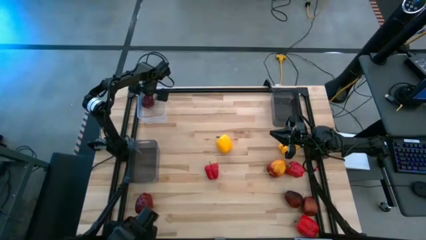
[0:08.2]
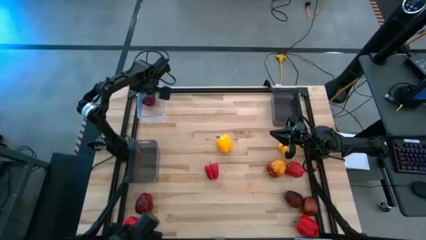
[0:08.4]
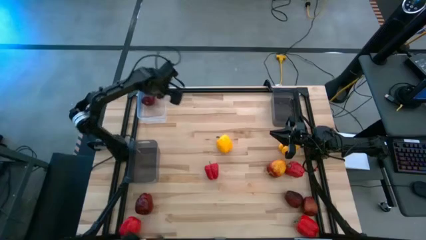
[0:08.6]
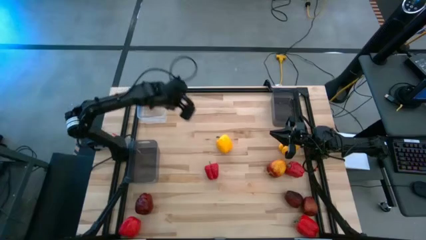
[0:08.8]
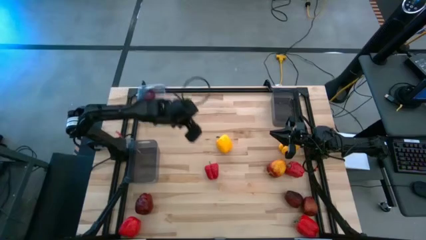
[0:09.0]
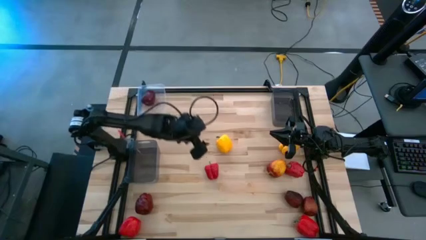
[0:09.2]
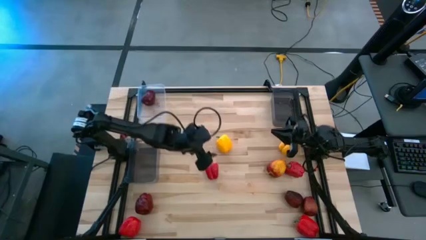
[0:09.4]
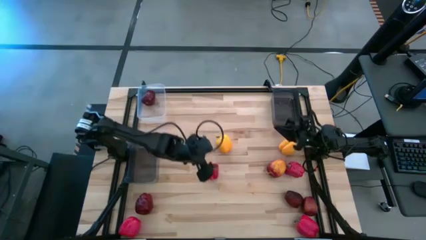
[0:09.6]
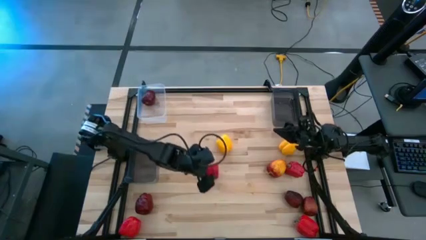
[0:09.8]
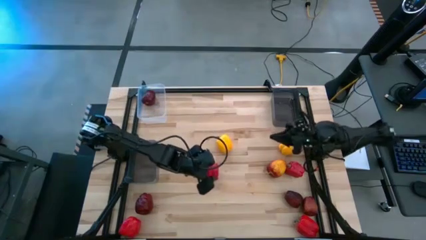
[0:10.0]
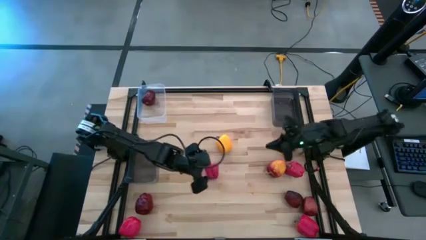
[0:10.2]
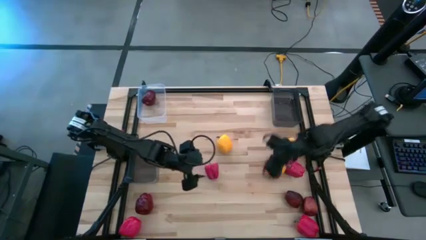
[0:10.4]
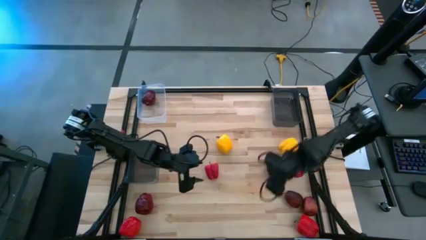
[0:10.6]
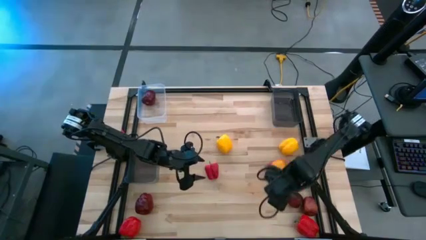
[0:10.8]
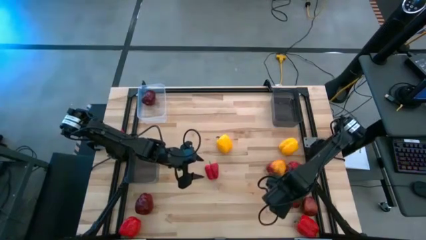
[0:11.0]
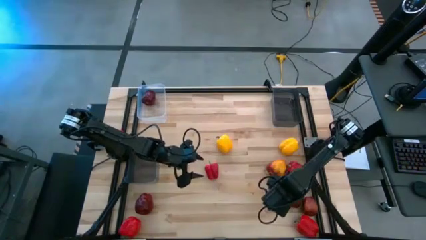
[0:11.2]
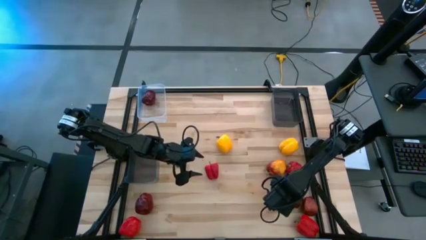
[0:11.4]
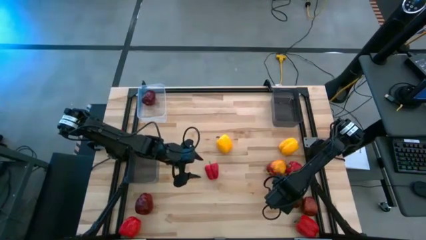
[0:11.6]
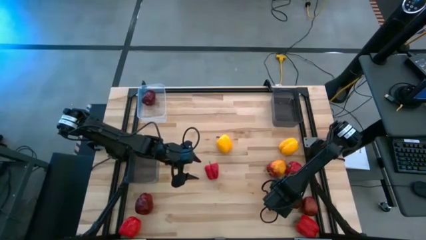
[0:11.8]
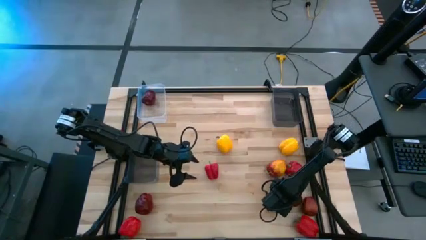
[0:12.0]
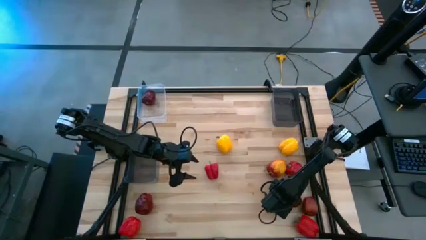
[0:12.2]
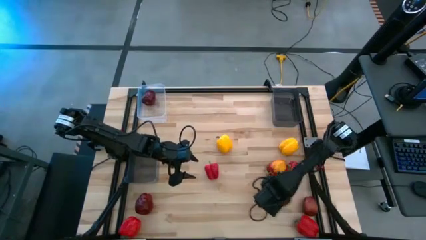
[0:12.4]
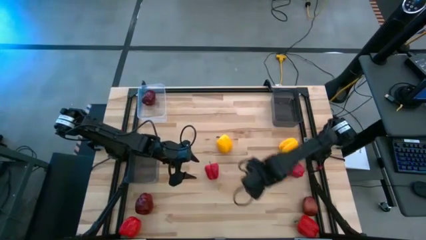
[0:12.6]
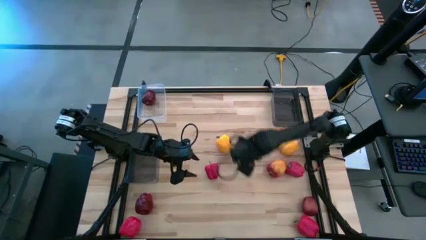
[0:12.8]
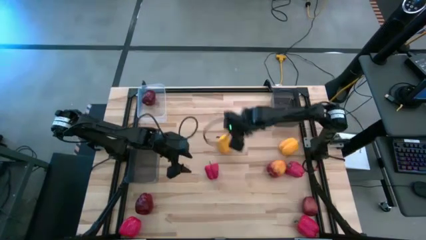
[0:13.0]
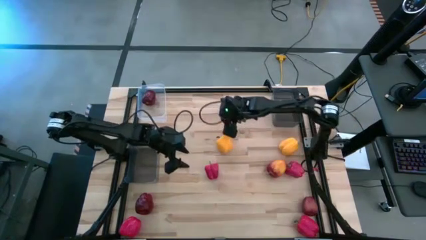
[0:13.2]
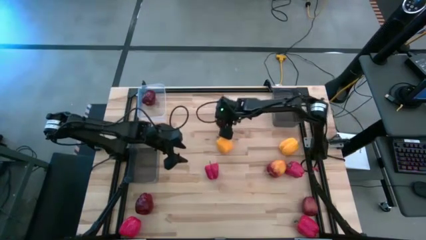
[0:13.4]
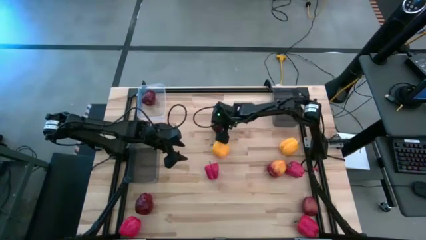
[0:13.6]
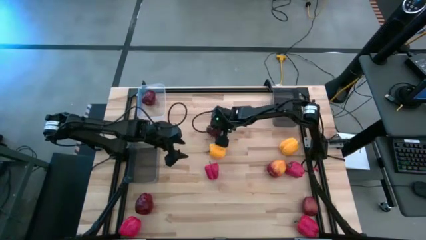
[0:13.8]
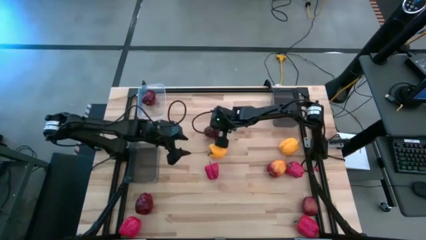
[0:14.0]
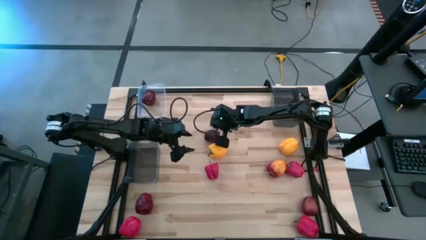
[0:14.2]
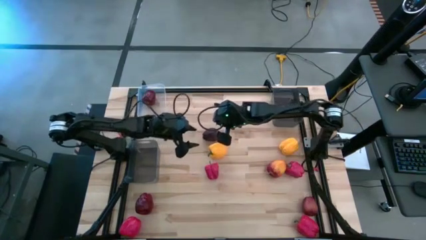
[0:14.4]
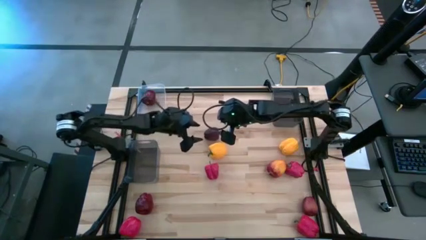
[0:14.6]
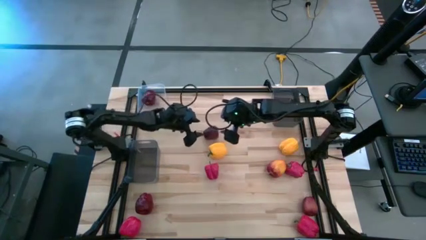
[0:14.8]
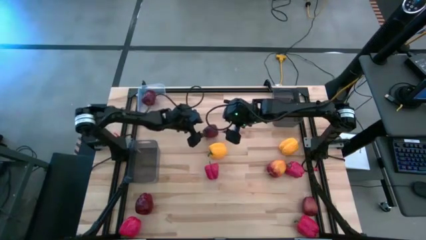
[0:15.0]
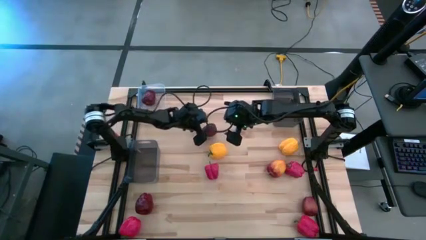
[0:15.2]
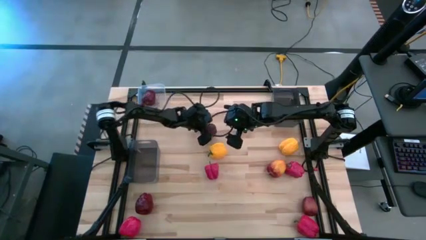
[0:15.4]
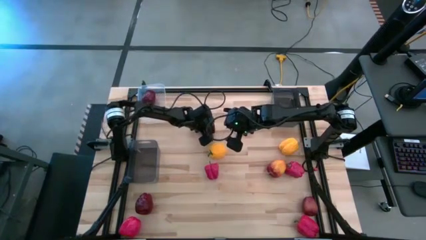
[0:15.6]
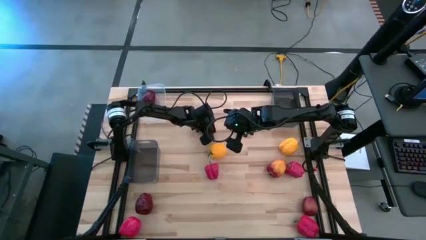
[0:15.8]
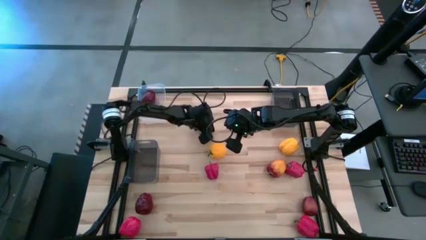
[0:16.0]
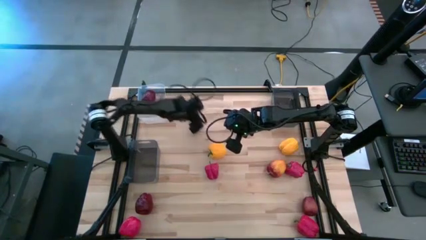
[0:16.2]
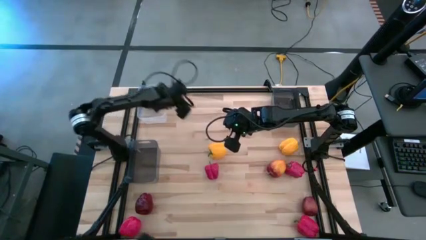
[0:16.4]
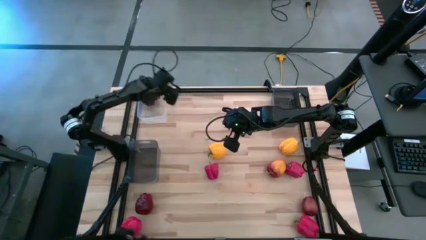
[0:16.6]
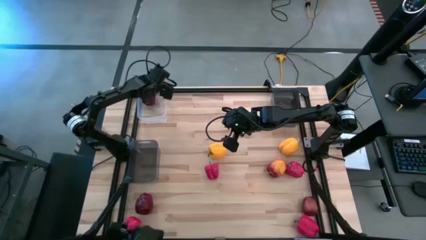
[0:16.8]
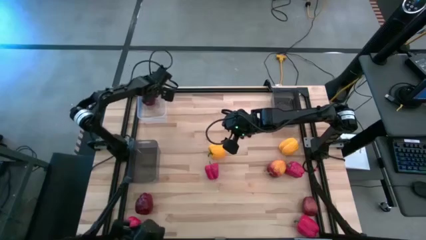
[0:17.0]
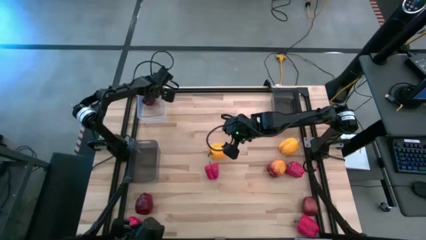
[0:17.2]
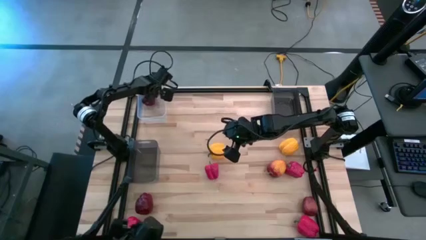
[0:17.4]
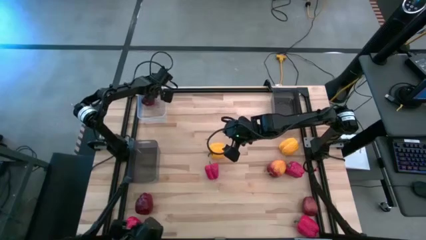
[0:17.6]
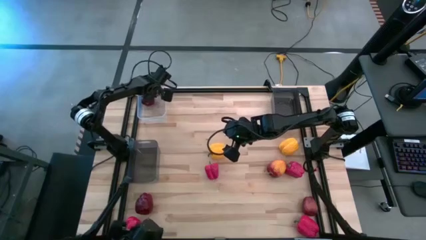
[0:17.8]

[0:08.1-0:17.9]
Task: Sort produce into baskets
Put the red apple into the transparent bin
